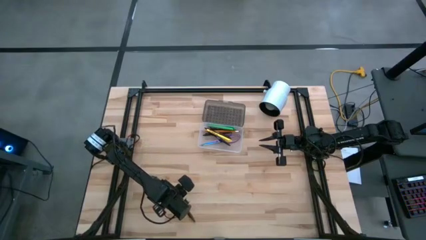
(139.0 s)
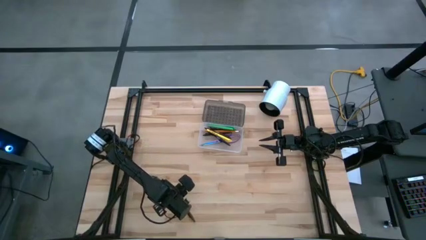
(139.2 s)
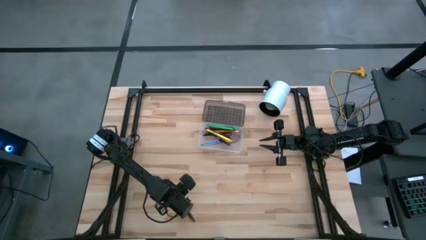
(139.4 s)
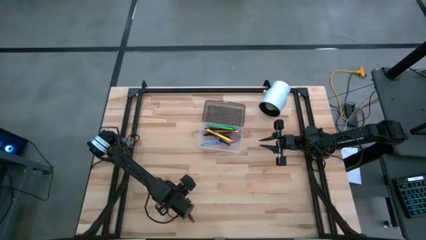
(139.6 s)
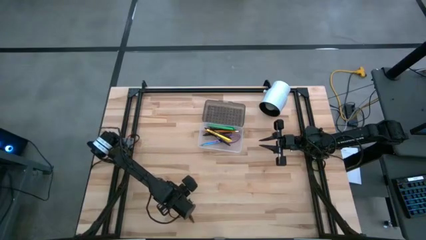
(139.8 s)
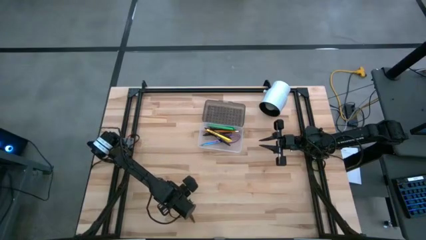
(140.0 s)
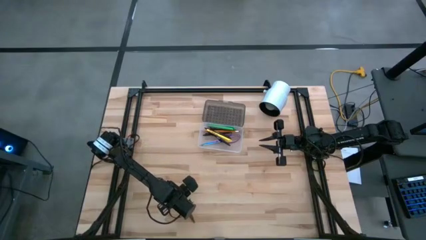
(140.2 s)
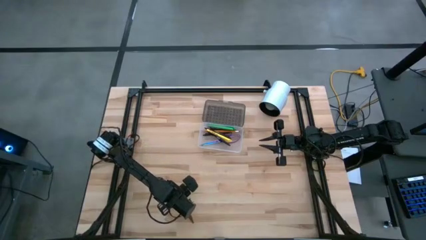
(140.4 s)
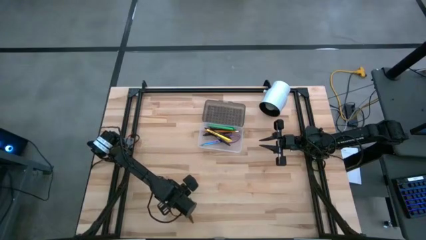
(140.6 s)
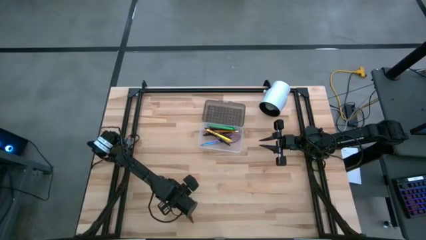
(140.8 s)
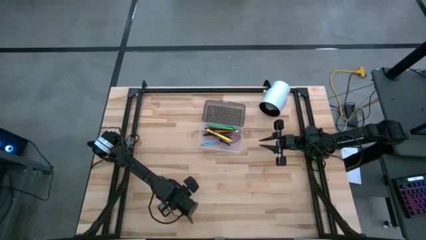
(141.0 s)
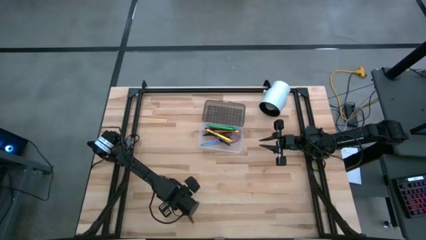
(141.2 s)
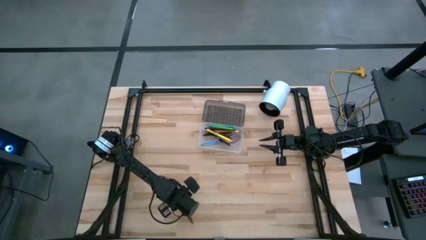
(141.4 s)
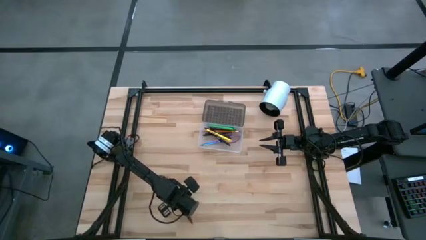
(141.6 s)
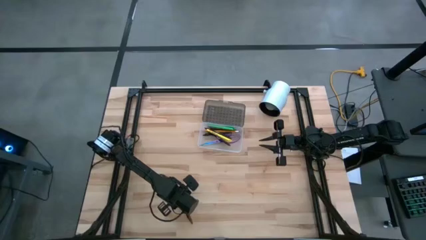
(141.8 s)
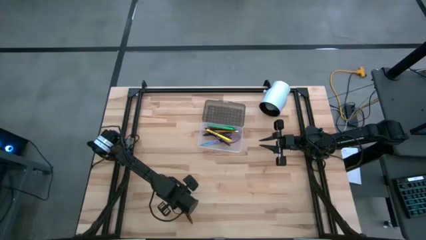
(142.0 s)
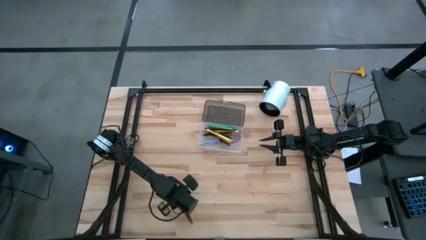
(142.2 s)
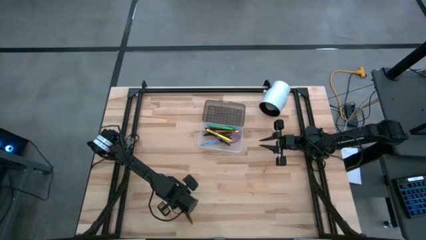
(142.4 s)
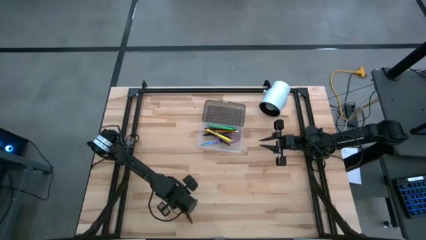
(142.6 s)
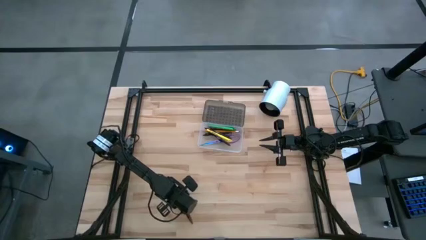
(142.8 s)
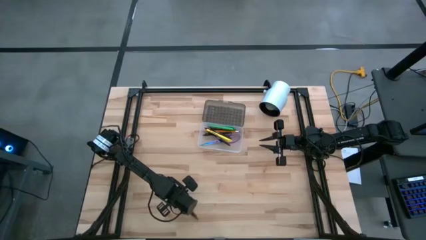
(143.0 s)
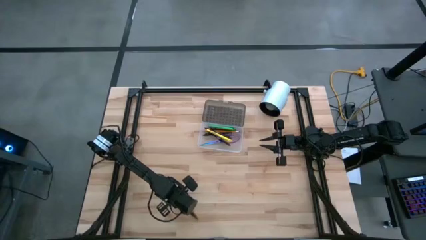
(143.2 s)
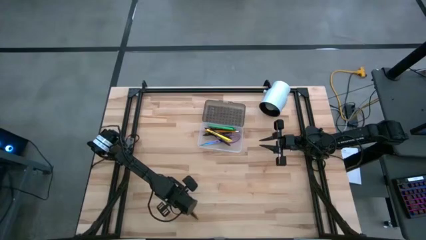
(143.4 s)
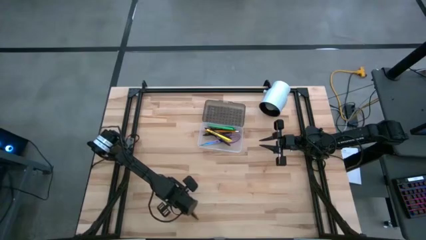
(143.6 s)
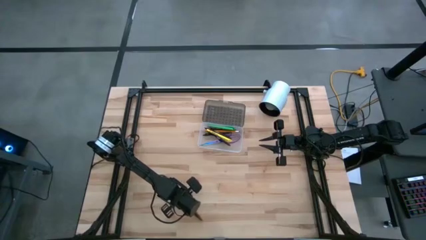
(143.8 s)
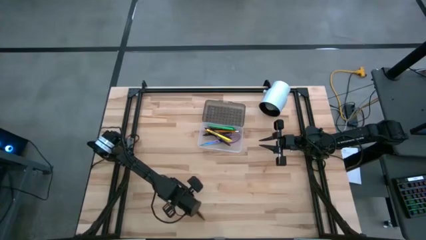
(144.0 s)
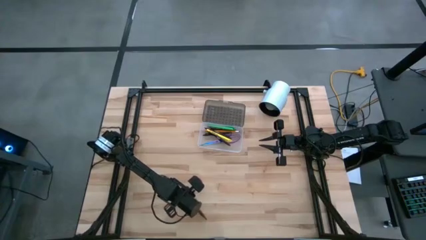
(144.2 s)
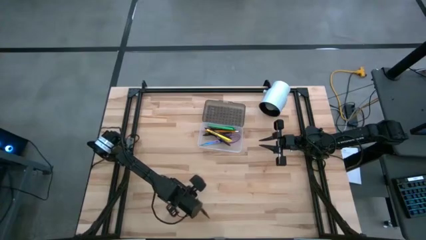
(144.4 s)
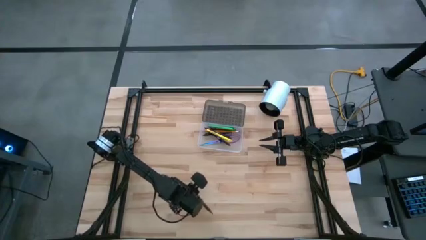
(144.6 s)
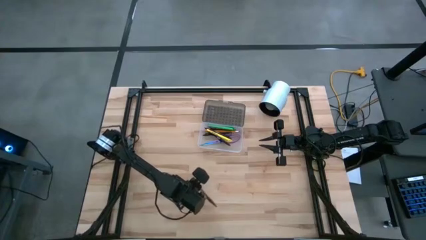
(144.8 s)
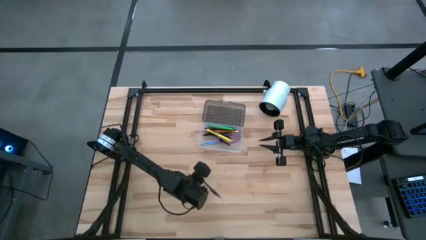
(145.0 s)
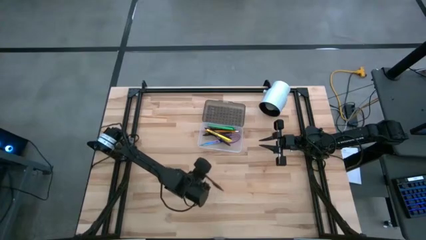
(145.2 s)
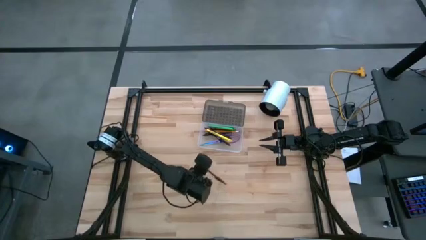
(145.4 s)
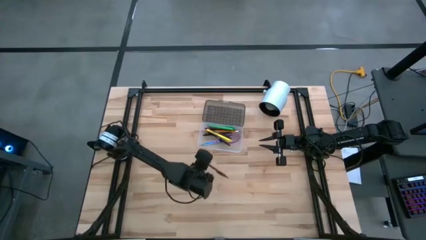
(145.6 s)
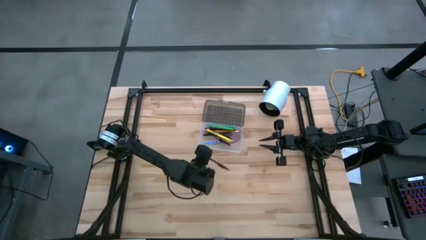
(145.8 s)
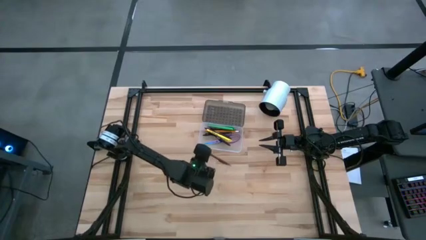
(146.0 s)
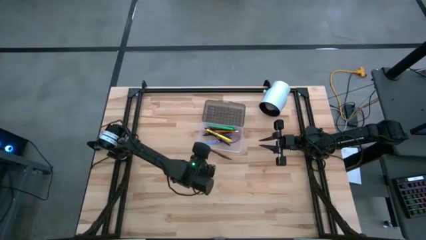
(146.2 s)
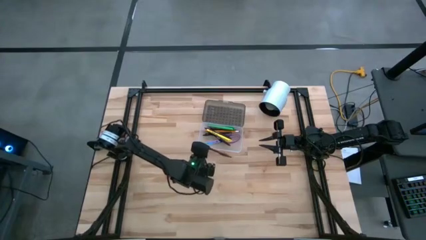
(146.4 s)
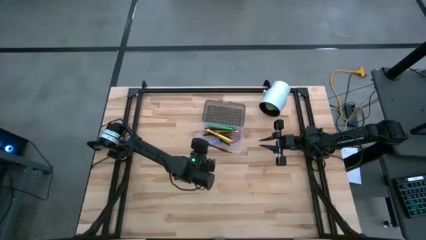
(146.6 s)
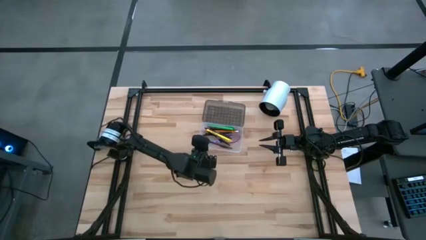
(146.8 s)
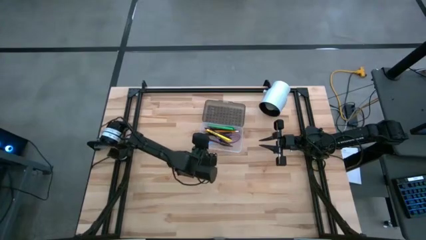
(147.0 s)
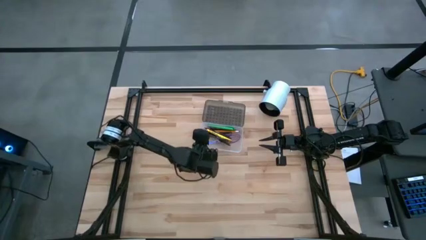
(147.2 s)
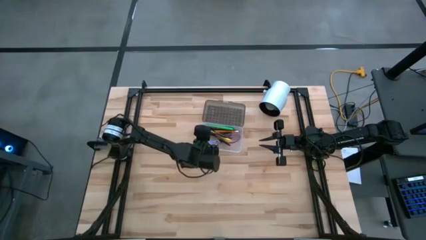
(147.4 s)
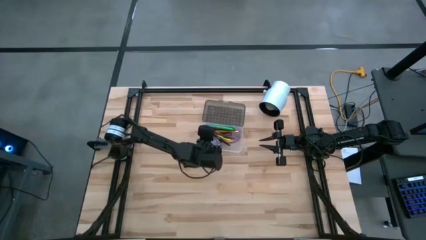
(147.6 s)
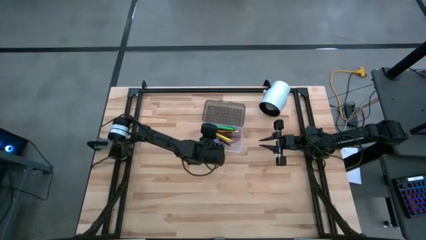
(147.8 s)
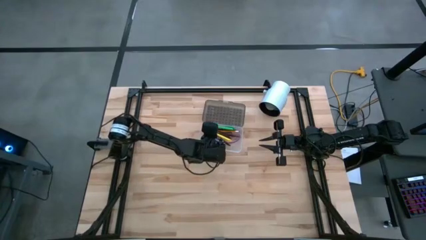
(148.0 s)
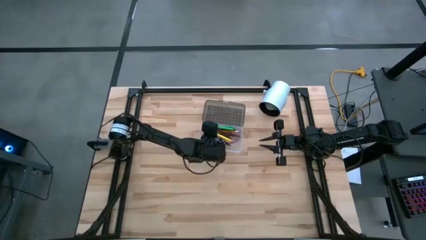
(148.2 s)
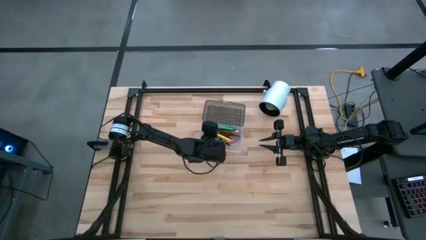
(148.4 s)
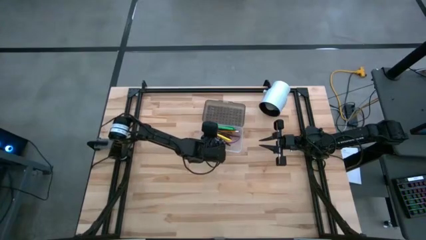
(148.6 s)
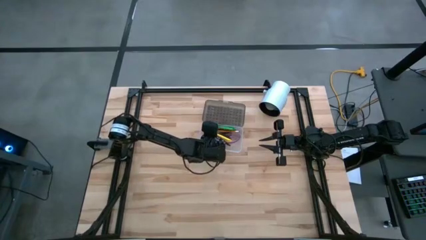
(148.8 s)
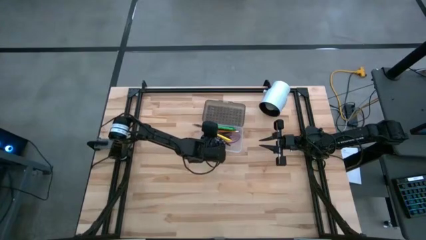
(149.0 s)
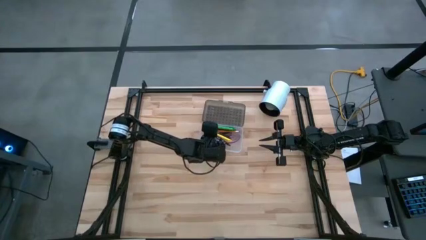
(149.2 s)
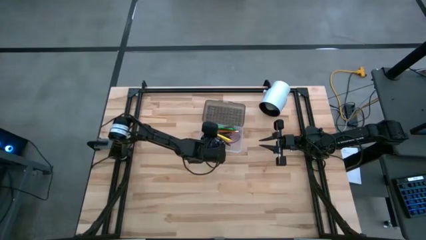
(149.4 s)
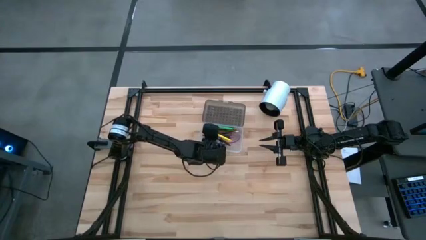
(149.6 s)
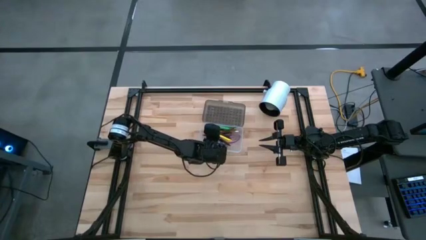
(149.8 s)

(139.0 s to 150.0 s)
Task: Pick & place school supplies into a supply box
Put the brown pen into the supply box
